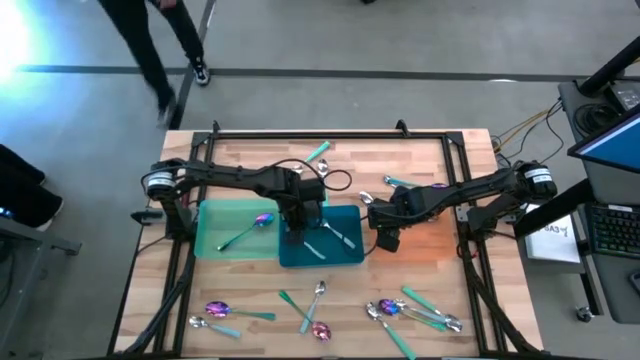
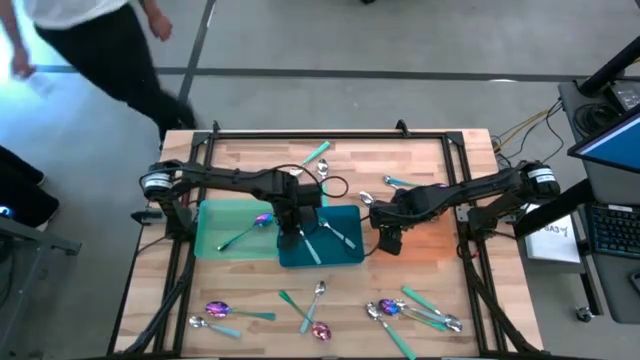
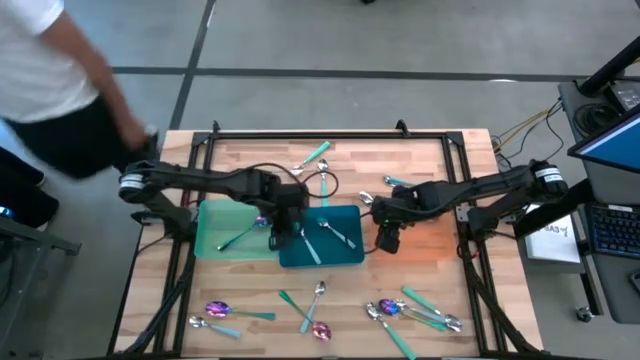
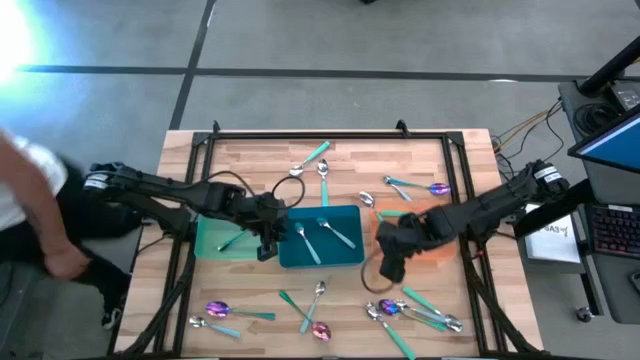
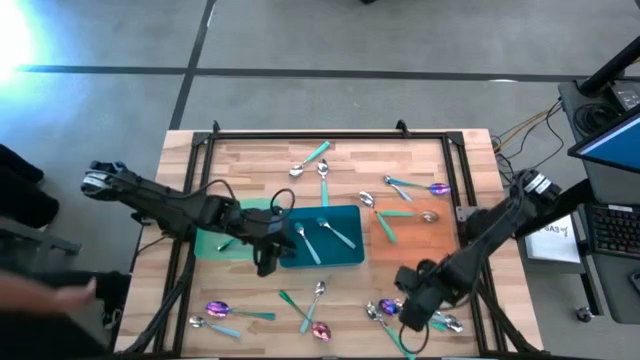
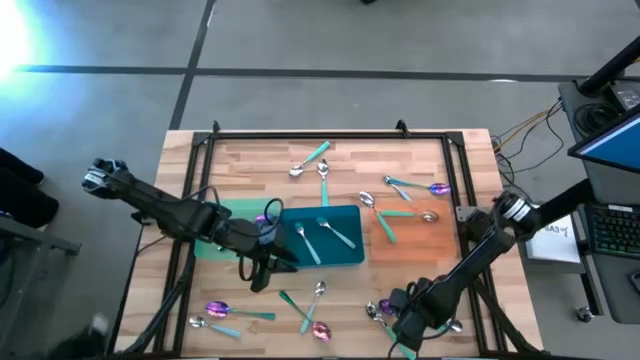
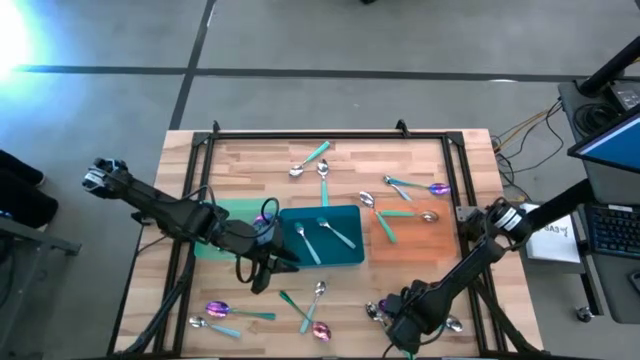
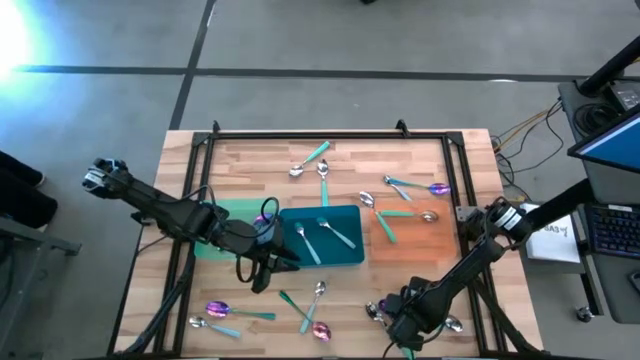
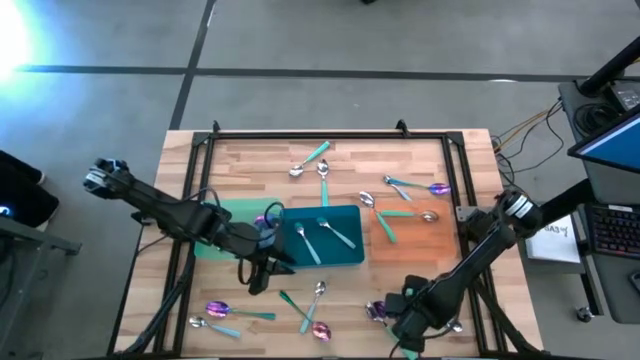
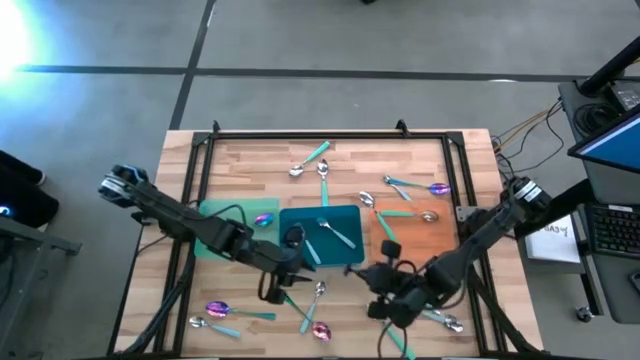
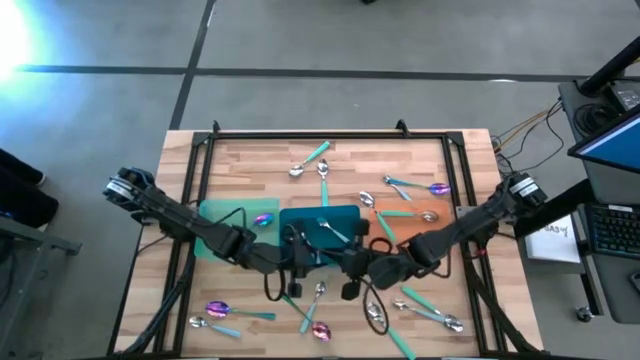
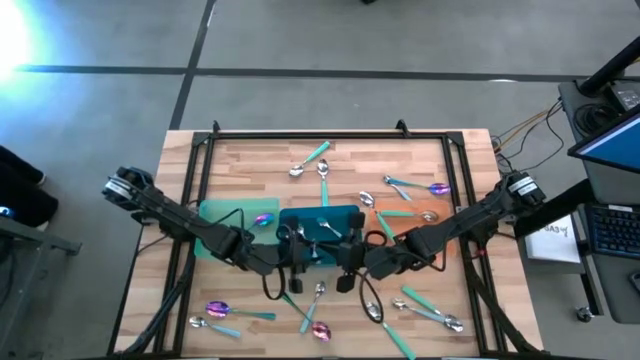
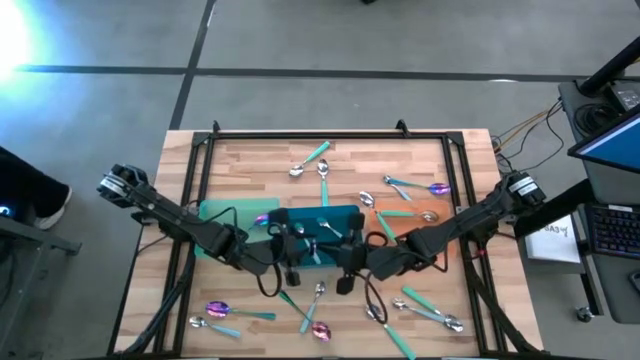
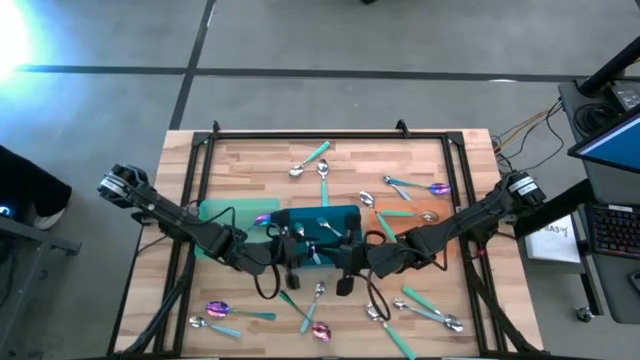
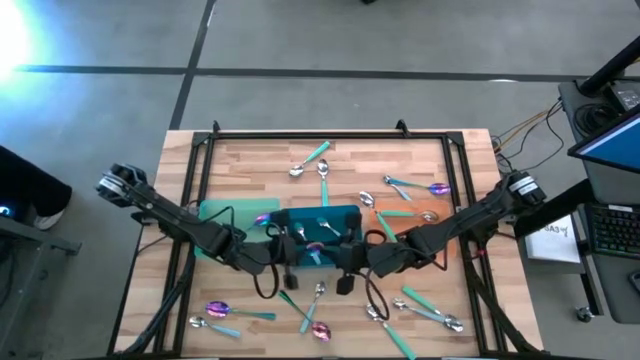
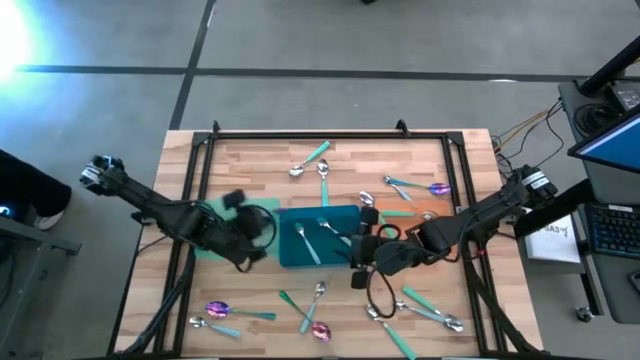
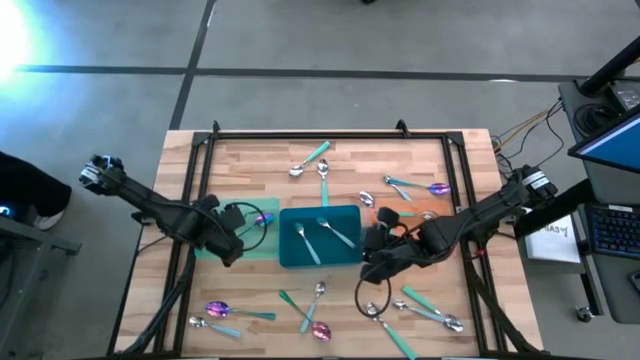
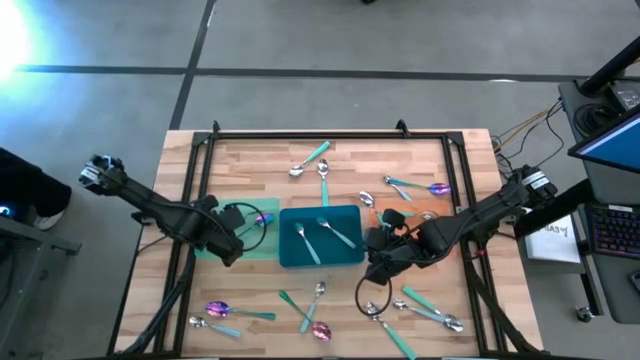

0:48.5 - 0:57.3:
Task: Sort silverware by color (type)
Put the violet spoon into the green bin

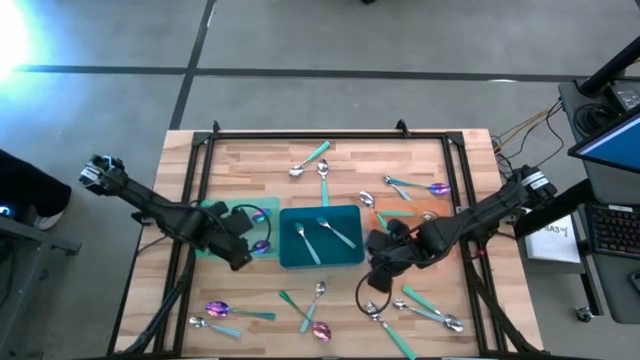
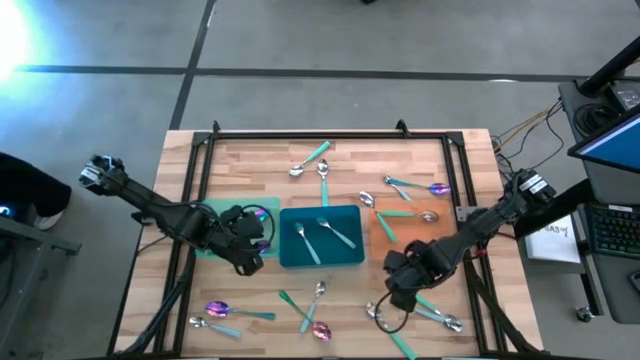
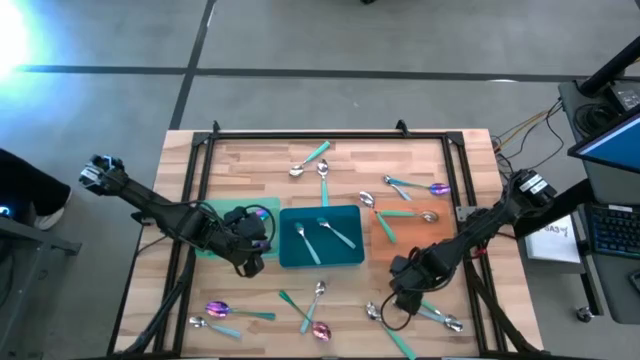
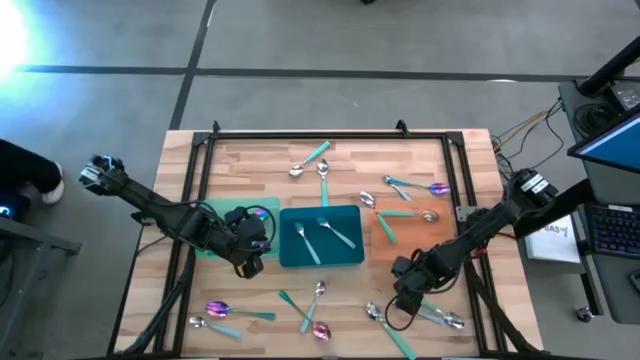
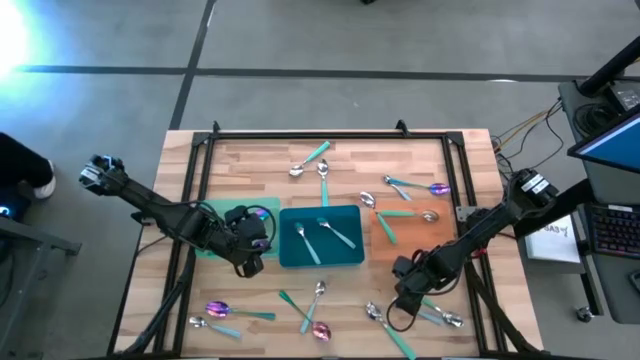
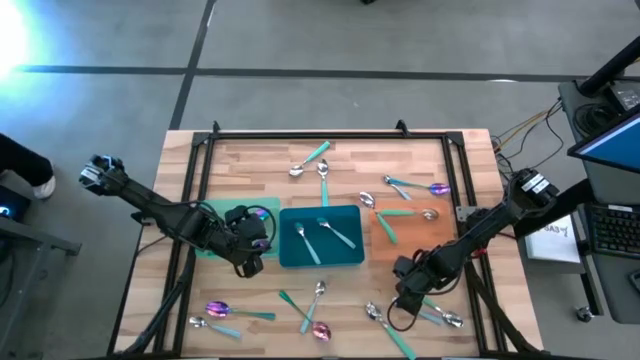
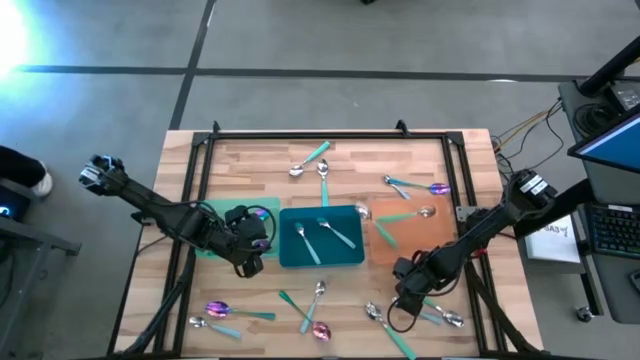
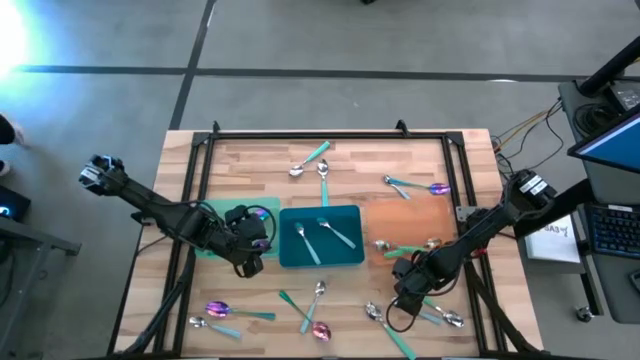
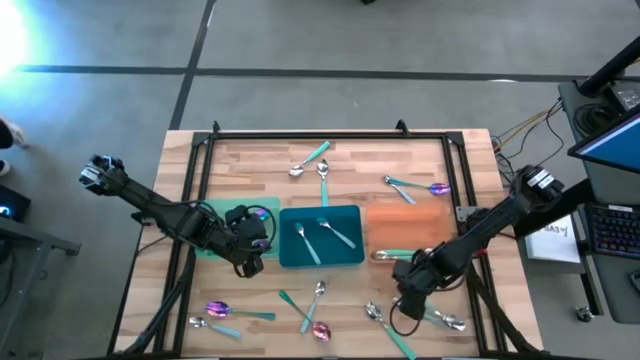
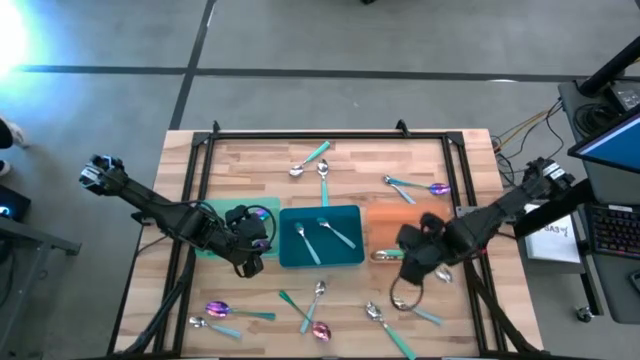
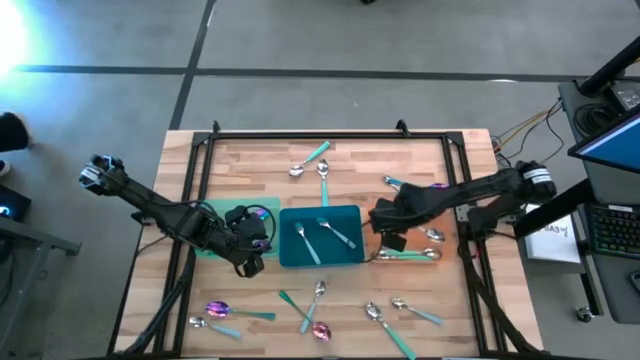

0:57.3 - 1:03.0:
Put the green spoon into the orange bin

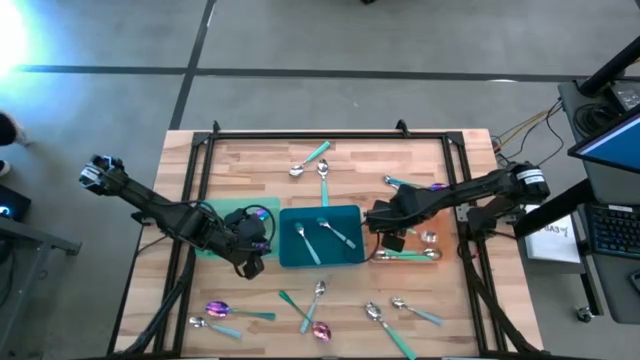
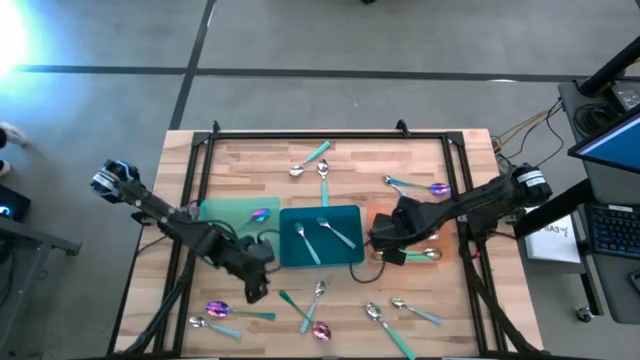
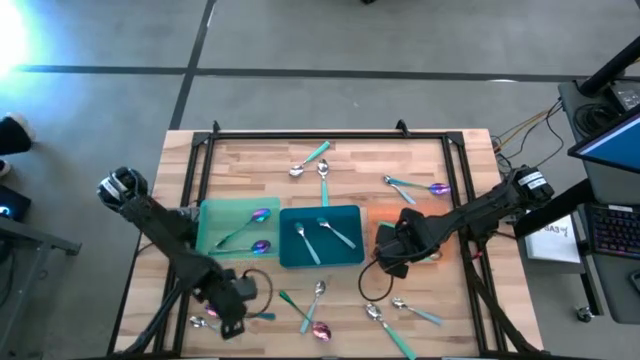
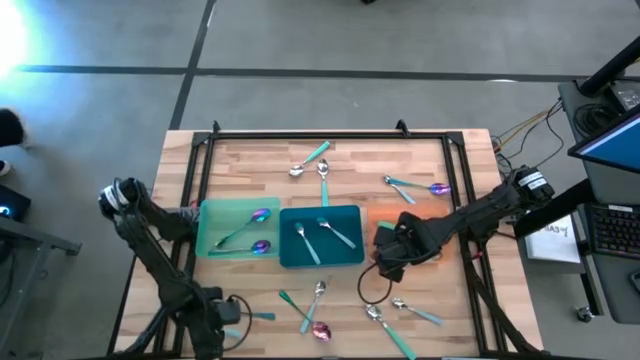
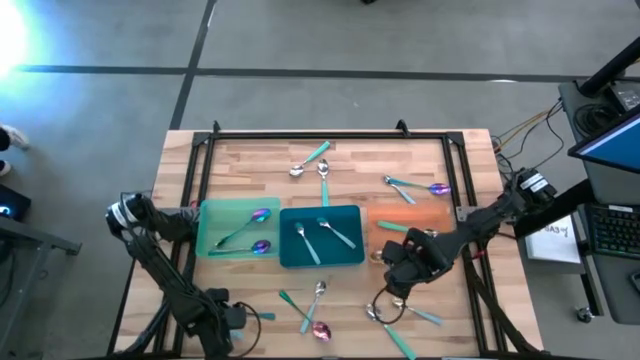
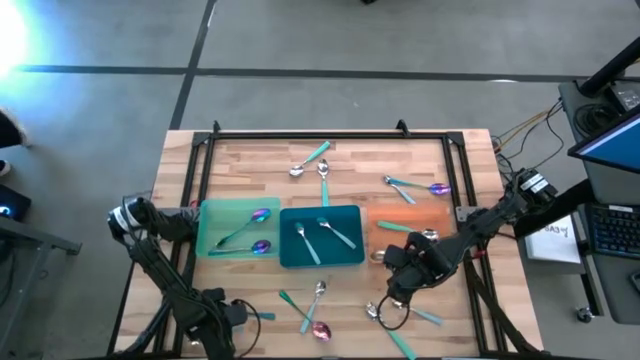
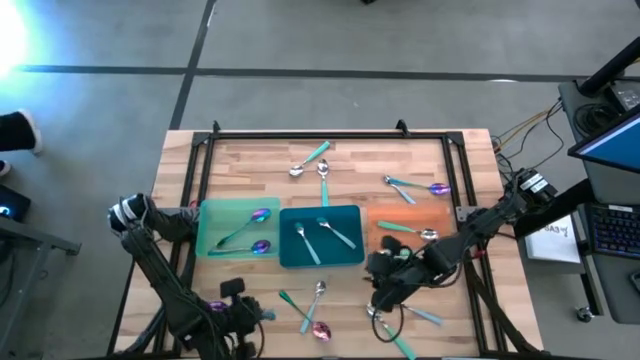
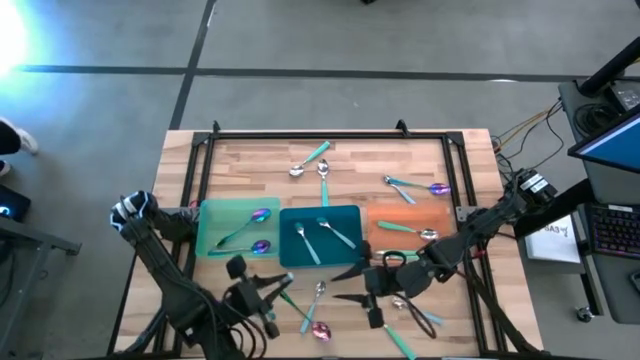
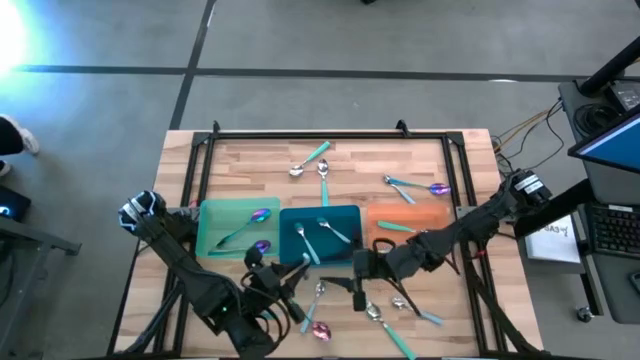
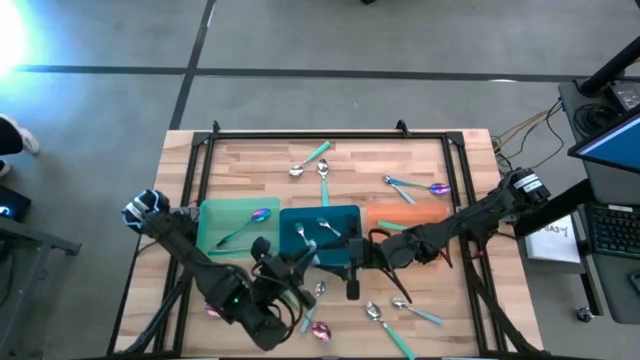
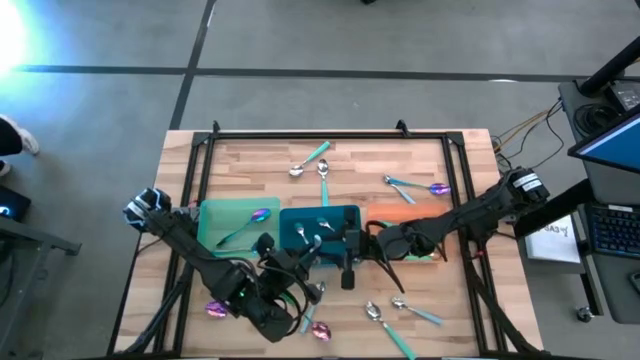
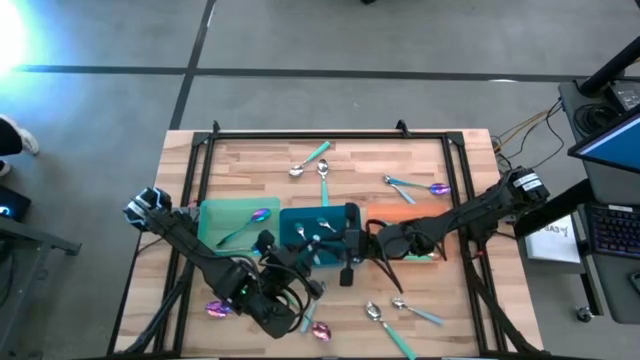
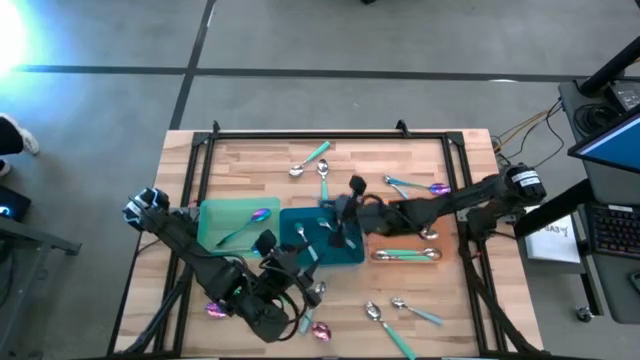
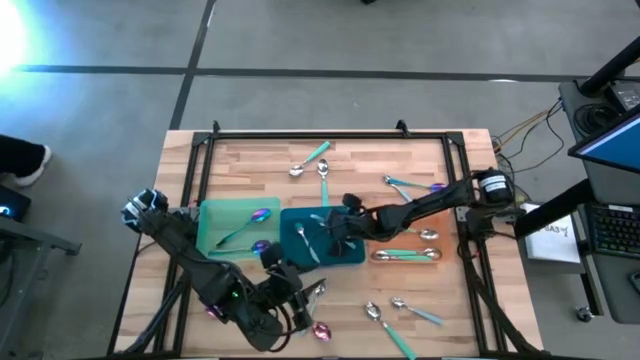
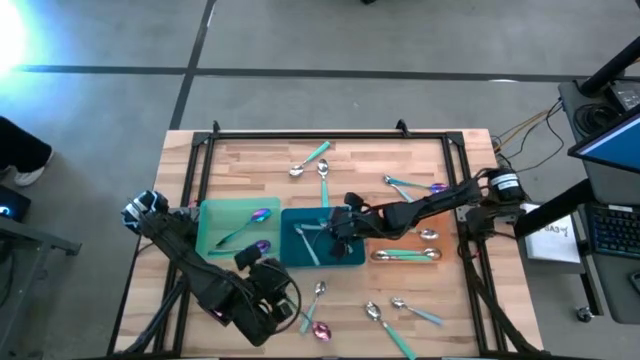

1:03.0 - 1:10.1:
Put the blue spoon into the blue bin
